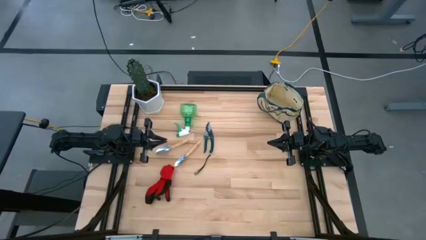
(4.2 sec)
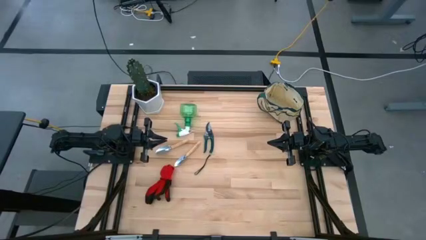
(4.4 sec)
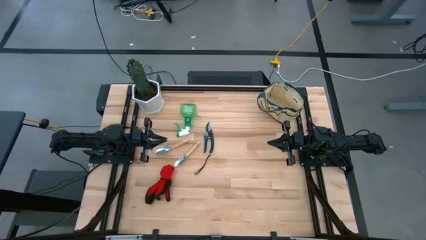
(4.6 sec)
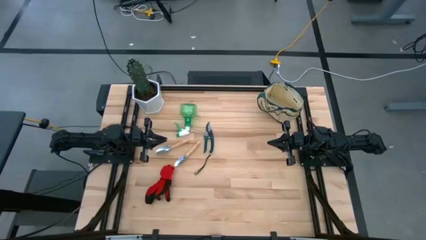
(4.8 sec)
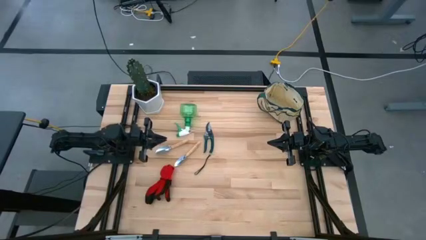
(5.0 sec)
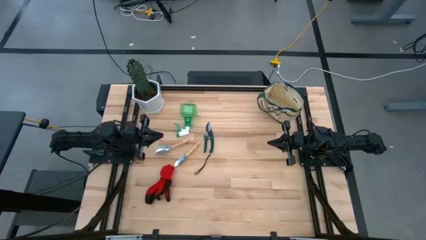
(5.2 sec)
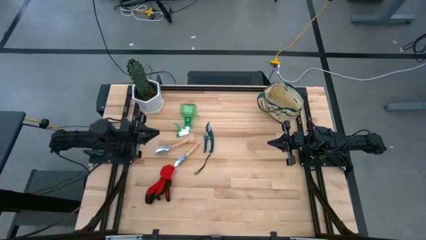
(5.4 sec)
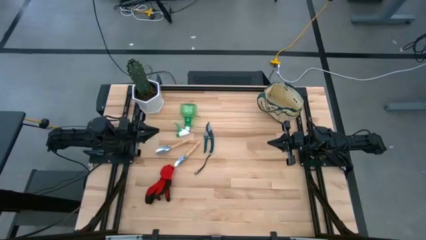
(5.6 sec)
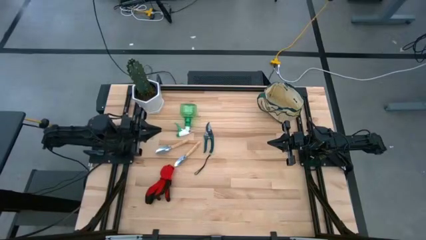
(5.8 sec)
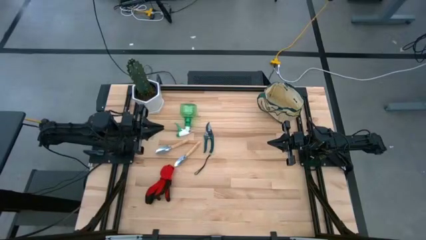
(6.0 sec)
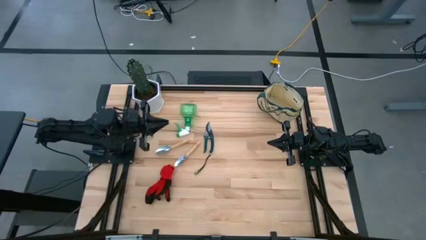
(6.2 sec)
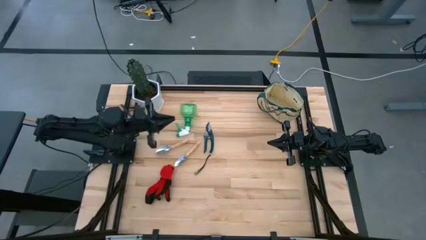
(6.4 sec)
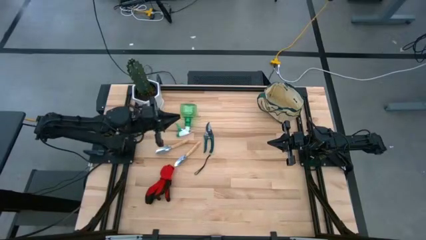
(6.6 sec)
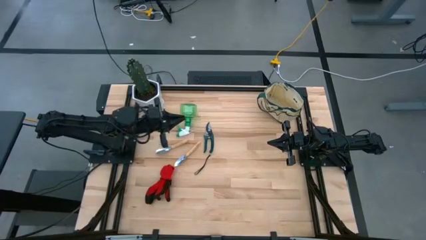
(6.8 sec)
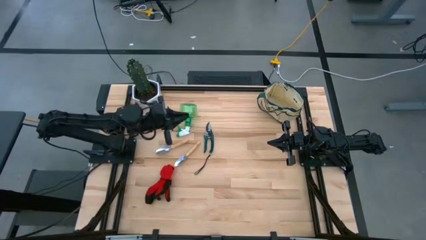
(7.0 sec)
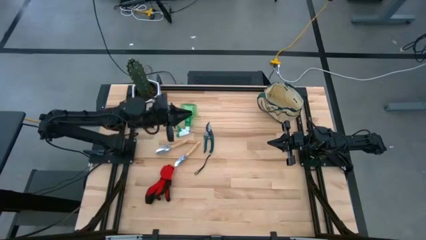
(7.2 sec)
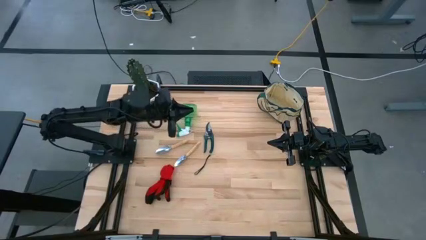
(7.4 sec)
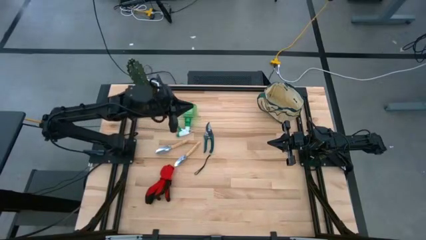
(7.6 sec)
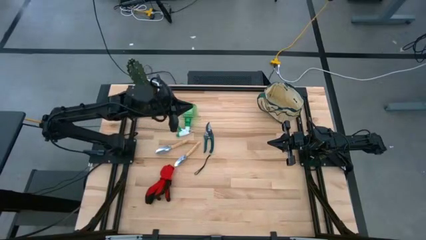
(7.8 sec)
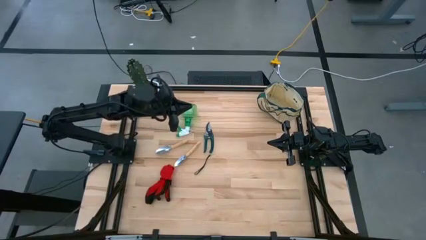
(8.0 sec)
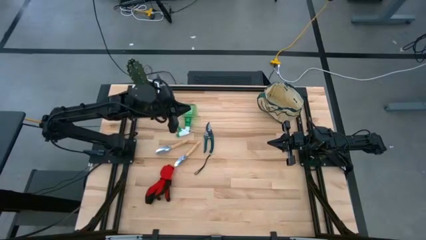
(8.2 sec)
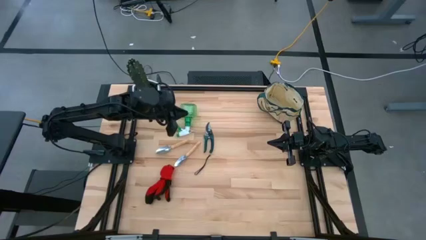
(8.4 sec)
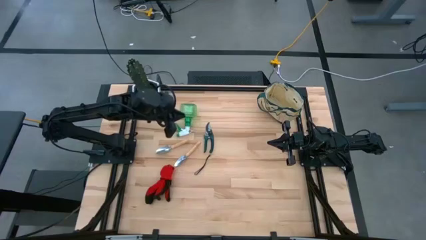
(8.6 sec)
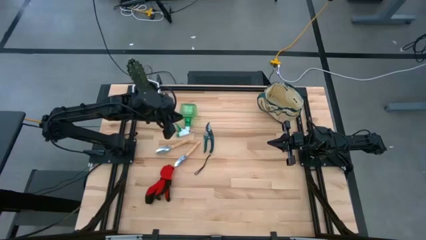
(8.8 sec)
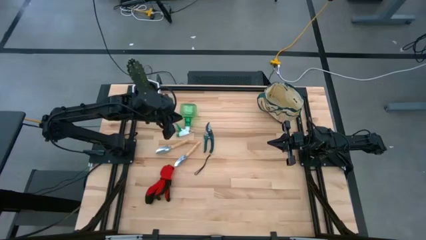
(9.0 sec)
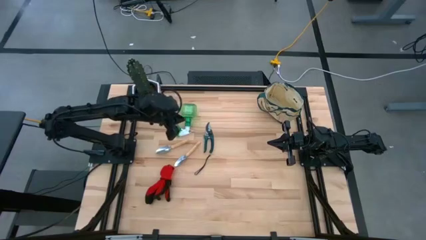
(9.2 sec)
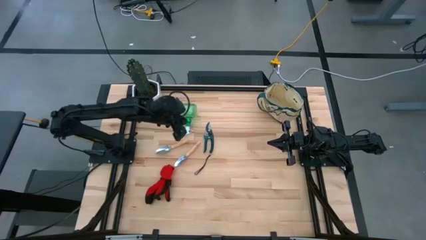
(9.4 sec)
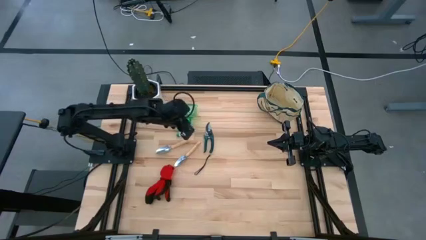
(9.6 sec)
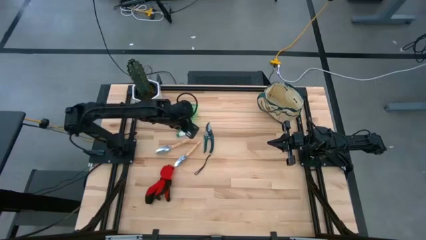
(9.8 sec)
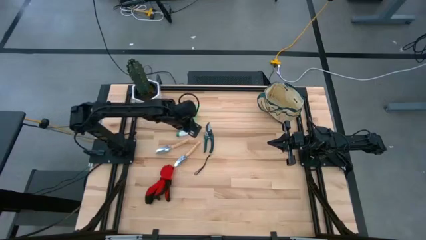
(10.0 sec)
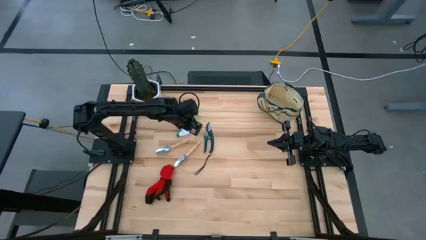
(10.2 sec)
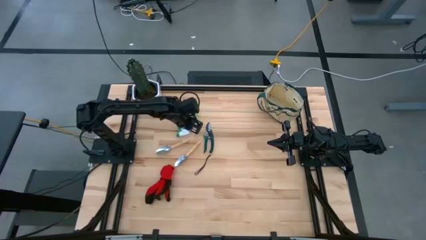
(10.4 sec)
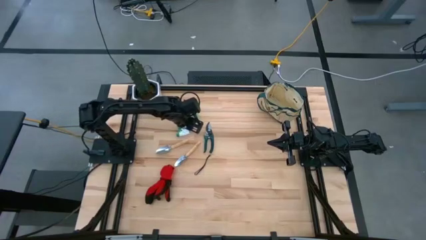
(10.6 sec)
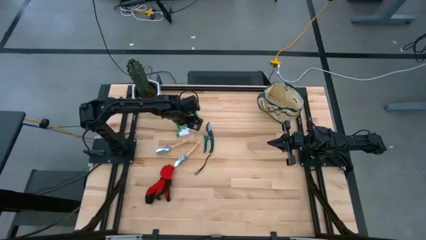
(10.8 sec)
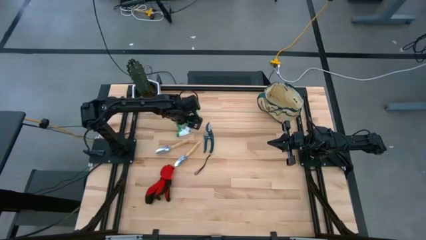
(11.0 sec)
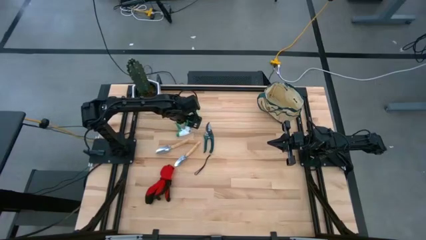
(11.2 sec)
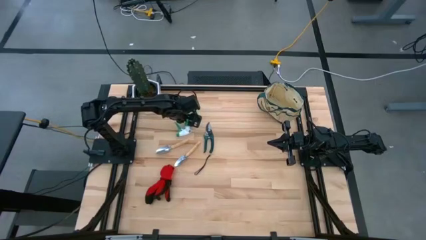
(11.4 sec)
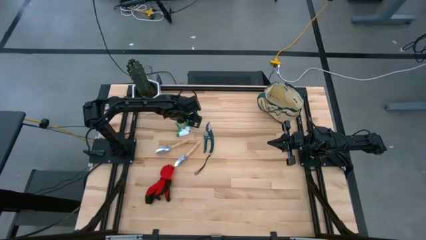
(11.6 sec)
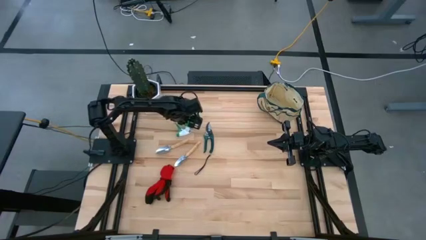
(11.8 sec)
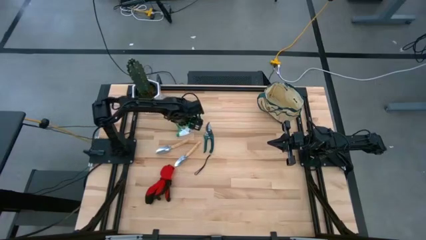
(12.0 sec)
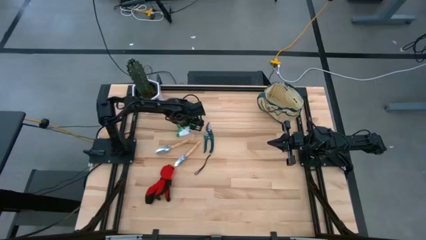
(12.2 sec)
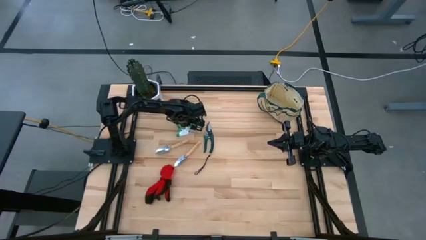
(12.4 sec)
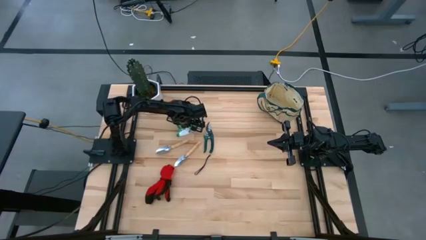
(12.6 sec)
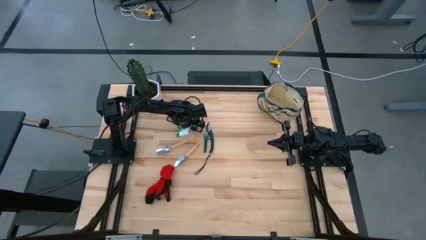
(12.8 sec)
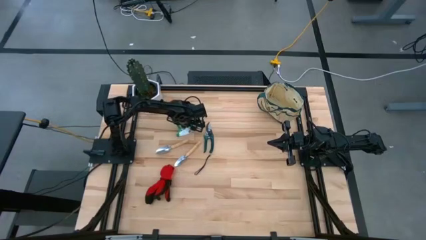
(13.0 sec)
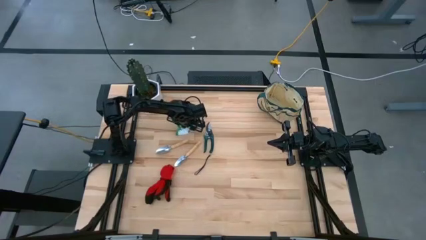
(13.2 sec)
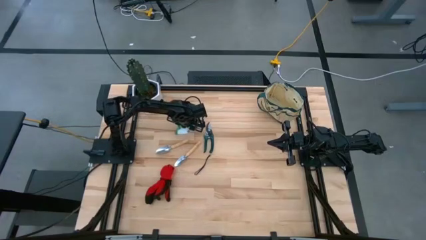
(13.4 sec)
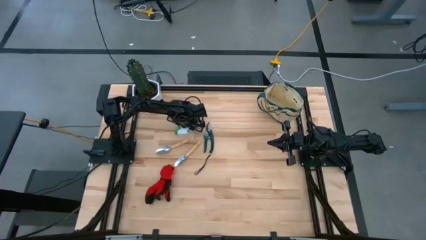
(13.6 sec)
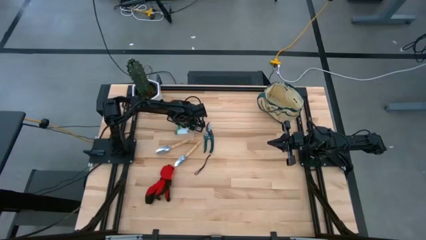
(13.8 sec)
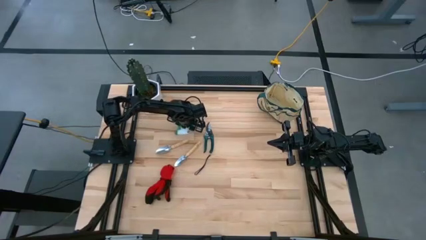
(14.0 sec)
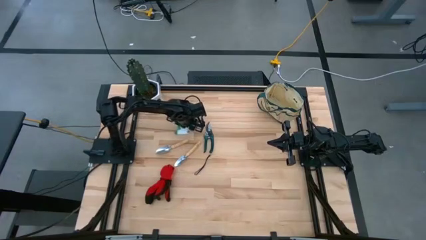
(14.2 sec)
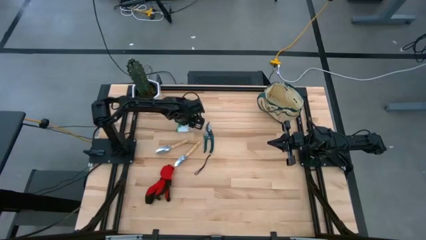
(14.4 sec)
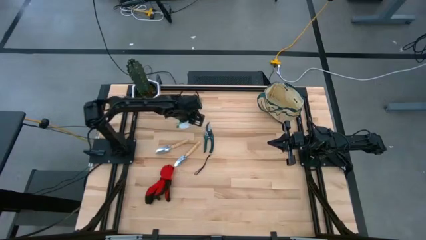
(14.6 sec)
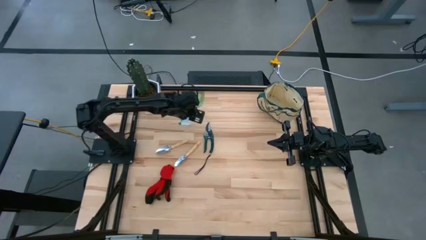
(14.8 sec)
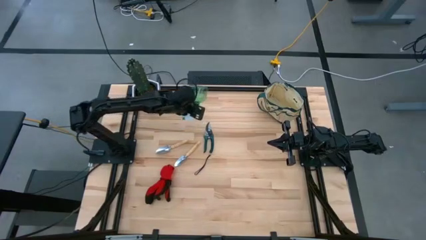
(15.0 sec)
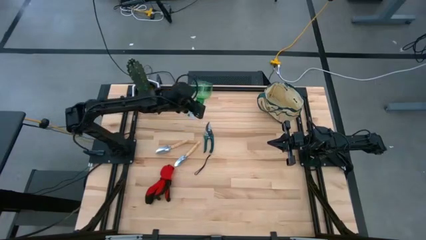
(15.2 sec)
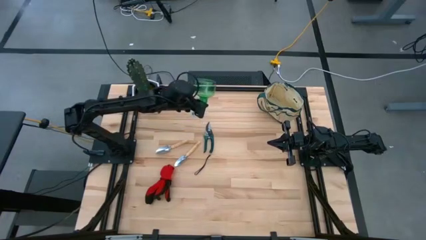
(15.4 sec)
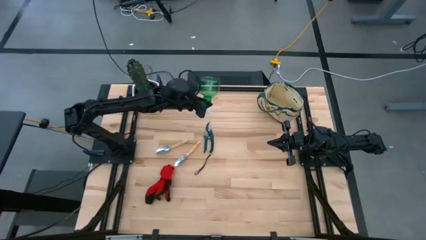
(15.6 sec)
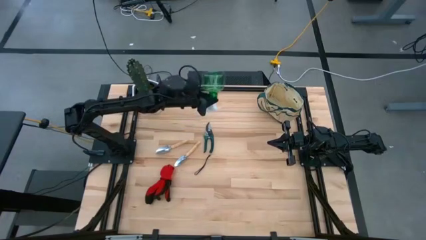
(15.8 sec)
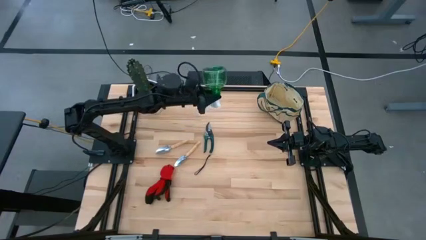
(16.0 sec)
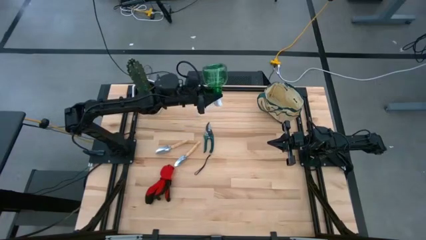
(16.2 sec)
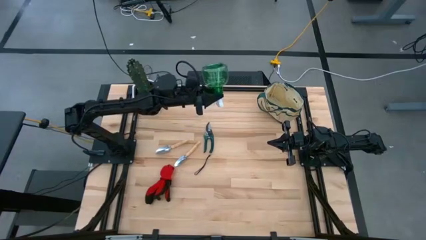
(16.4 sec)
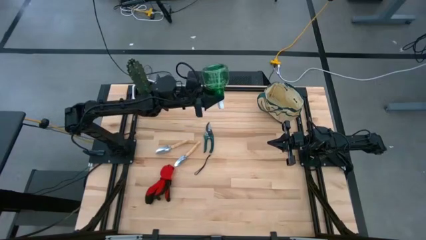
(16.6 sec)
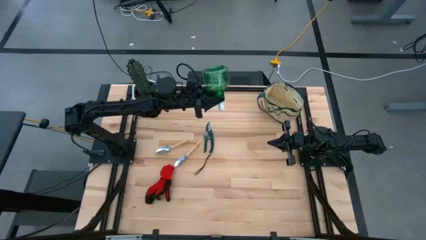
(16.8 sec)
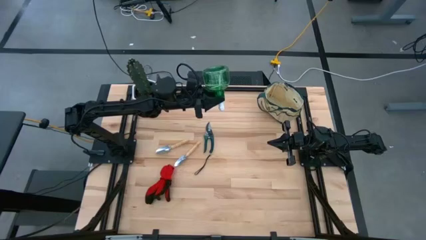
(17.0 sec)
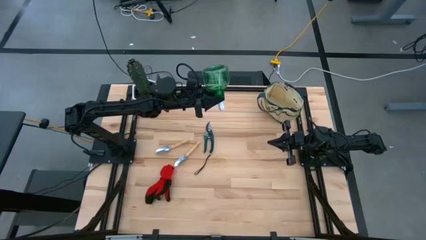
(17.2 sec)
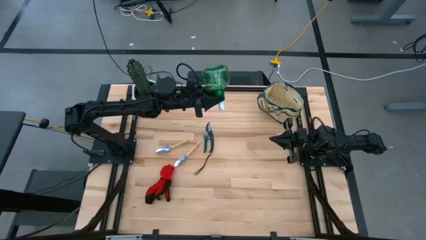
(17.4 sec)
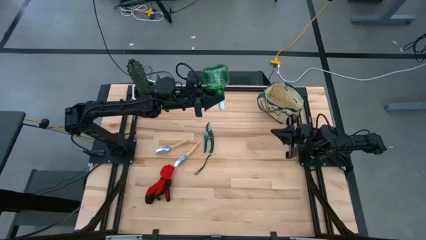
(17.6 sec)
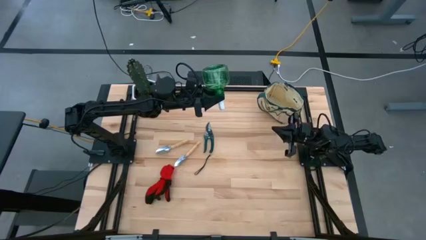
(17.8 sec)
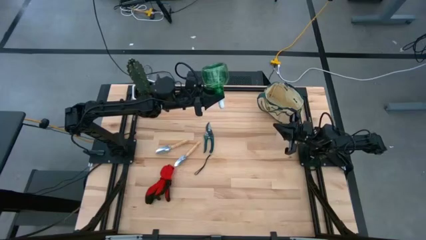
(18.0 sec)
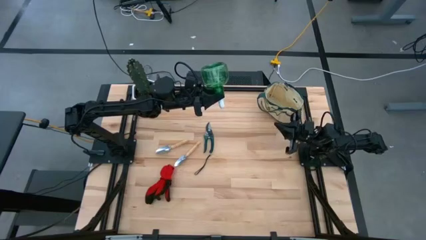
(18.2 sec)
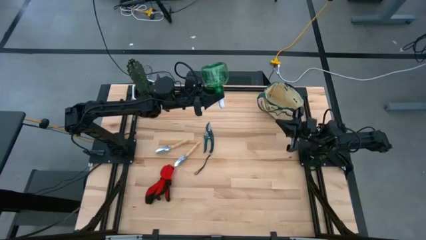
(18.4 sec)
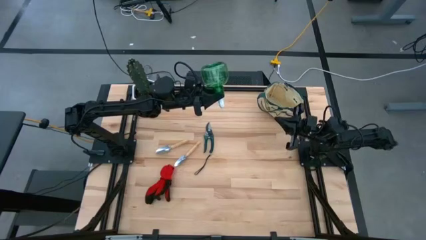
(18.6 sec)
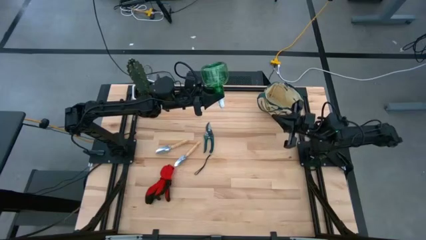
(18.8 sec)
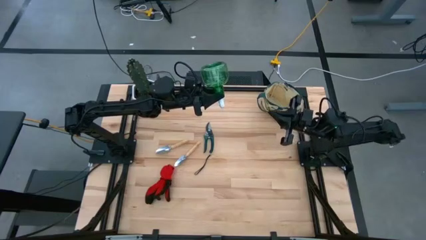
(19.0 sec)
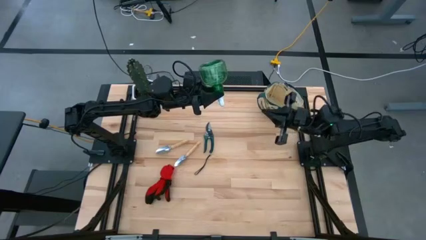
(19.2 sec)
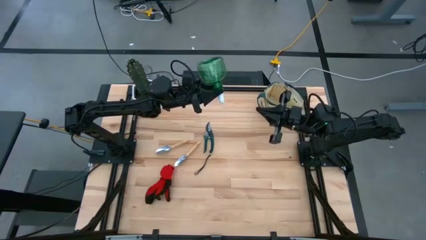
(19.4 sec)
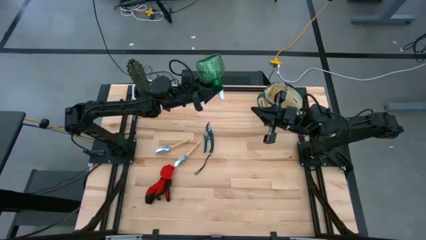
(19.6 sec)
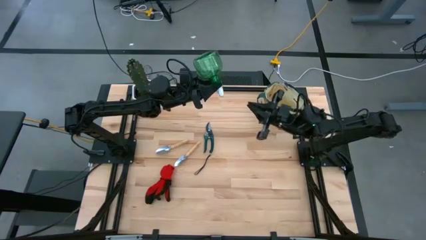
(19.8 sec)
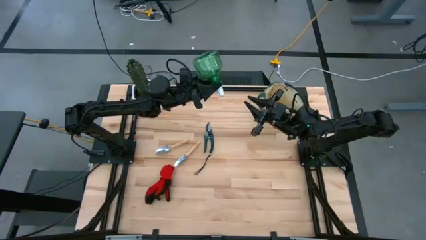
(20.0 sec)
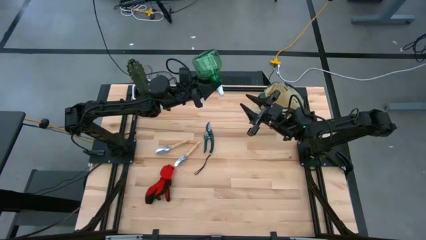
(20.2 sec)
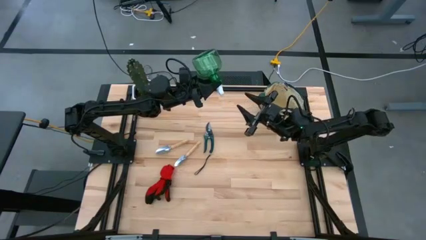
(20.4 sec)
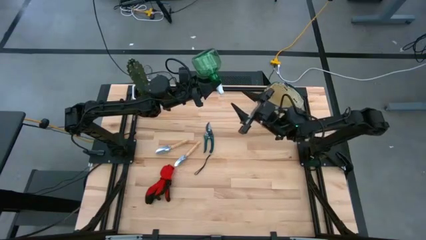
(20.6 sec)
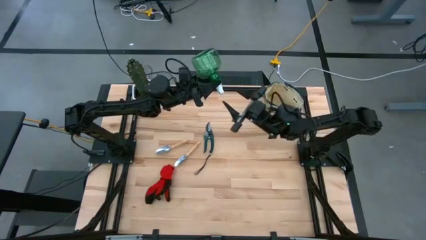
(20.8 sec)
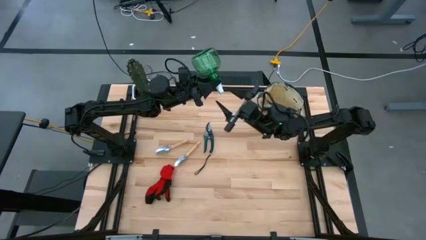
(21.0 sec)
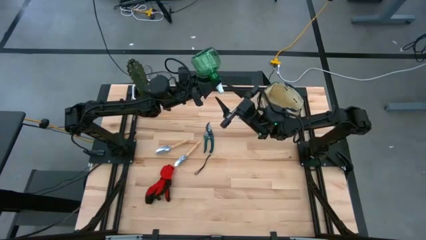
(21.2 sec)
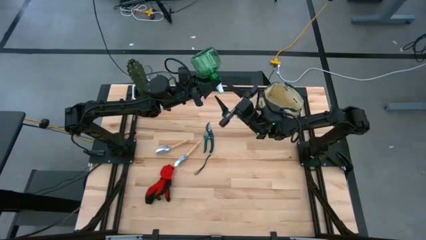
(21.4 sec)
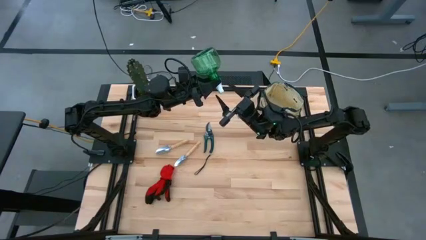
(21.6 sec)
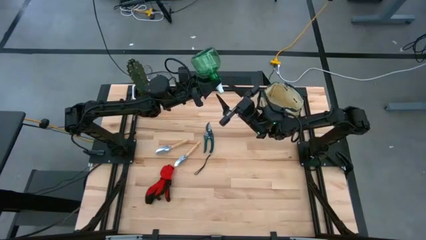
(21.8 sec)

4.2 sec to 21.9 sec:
Task: Pick & Place Garden tools in Gardening bag
Put the green spray bottle into the white gardening bag
